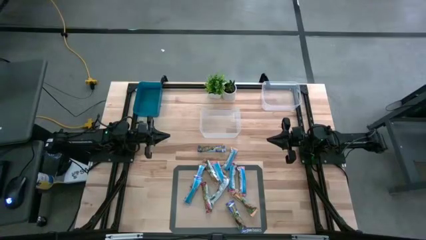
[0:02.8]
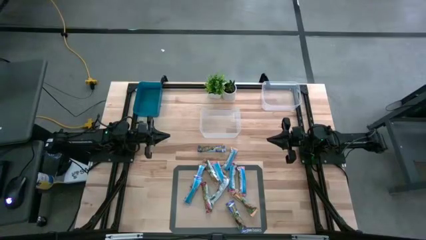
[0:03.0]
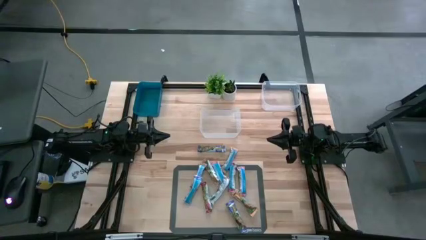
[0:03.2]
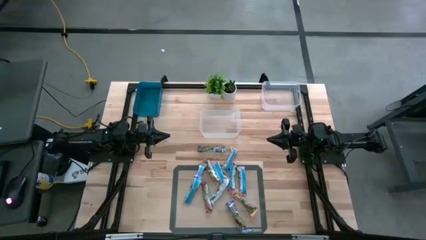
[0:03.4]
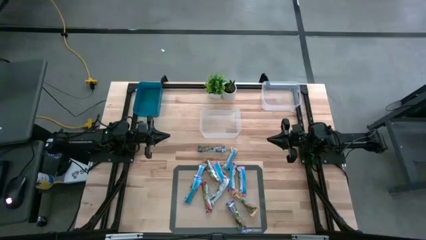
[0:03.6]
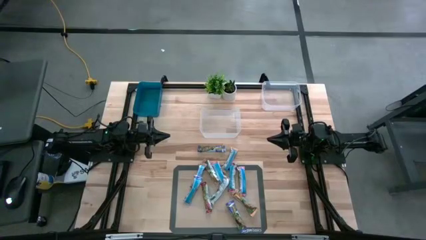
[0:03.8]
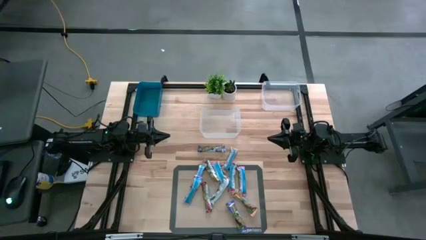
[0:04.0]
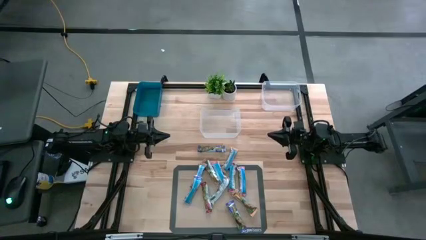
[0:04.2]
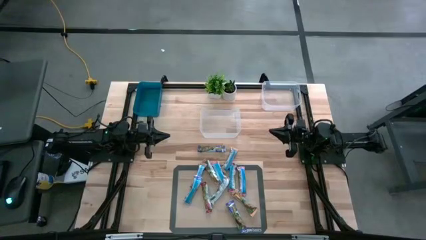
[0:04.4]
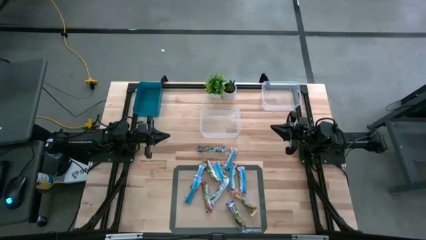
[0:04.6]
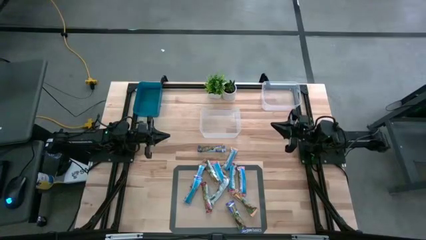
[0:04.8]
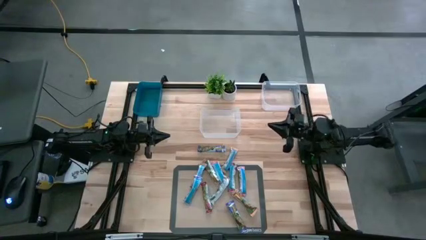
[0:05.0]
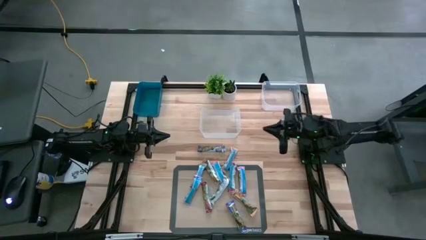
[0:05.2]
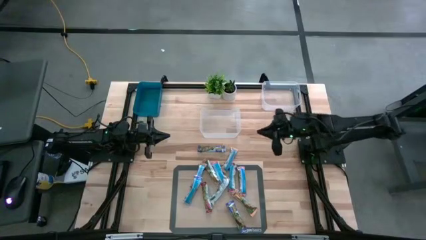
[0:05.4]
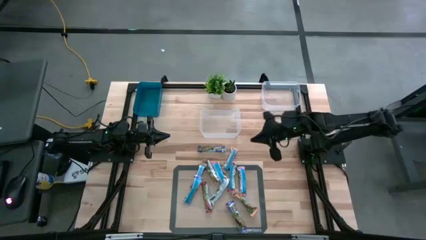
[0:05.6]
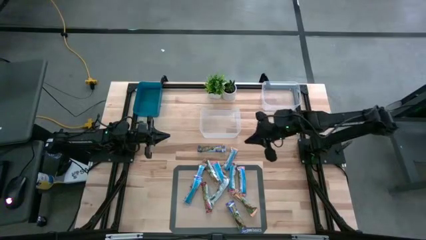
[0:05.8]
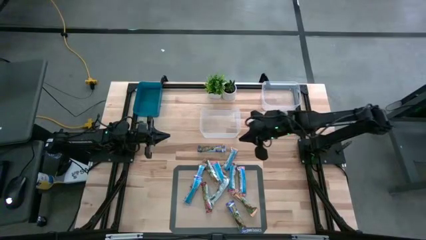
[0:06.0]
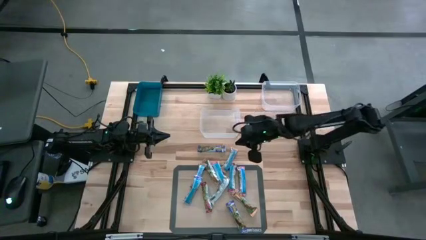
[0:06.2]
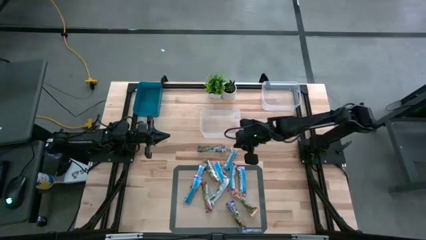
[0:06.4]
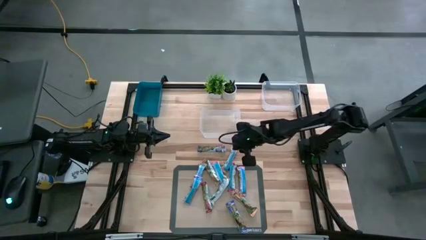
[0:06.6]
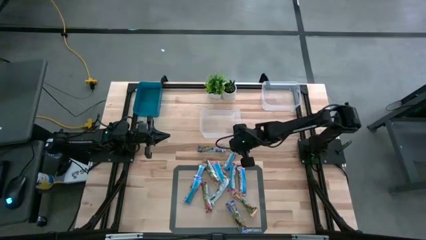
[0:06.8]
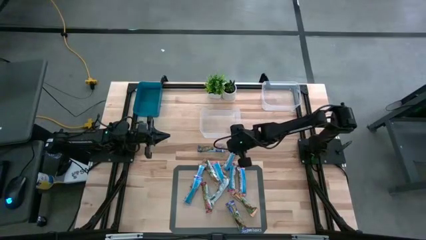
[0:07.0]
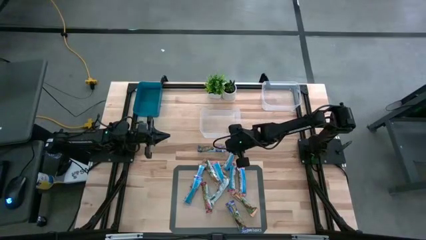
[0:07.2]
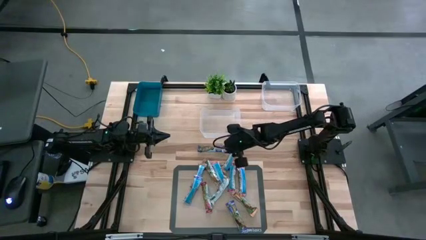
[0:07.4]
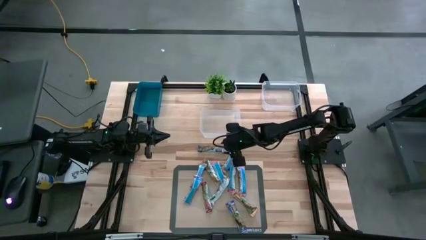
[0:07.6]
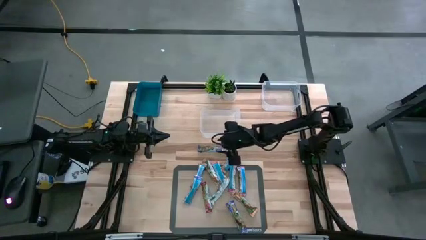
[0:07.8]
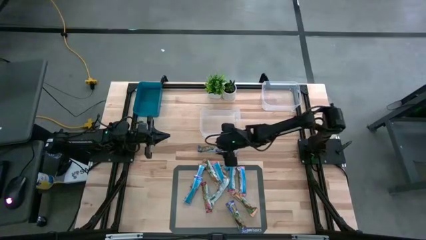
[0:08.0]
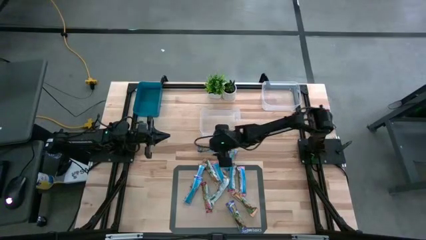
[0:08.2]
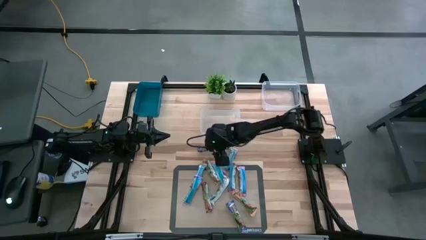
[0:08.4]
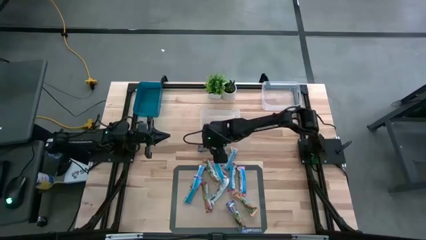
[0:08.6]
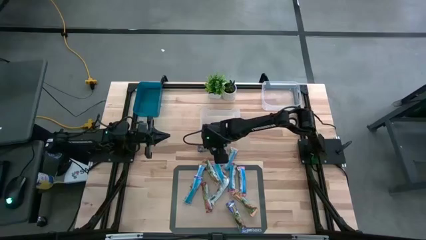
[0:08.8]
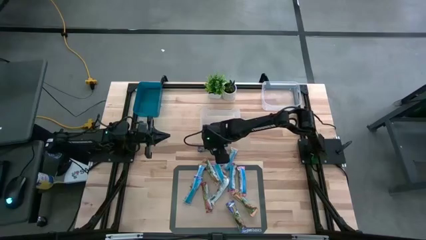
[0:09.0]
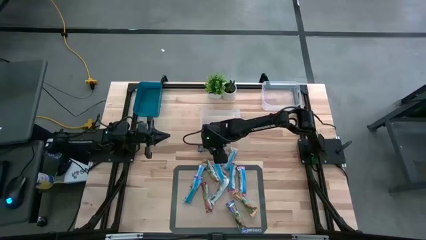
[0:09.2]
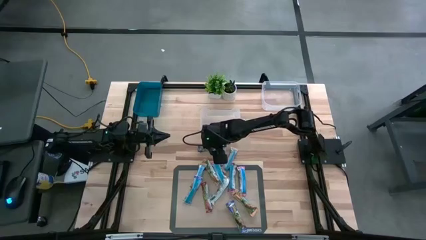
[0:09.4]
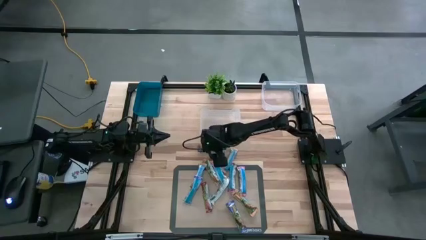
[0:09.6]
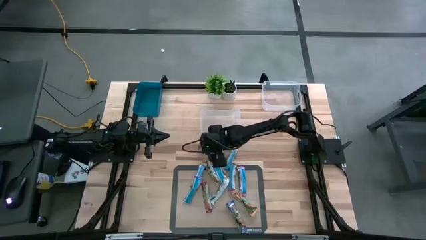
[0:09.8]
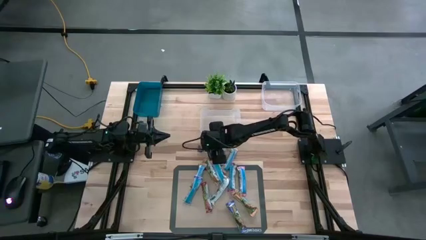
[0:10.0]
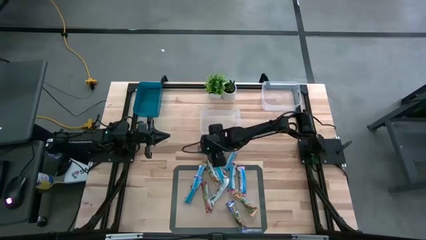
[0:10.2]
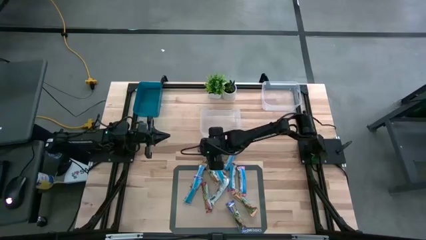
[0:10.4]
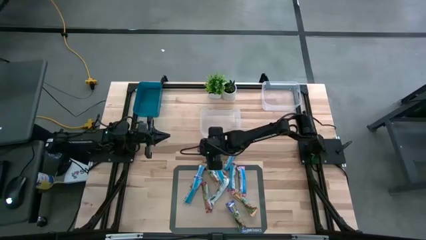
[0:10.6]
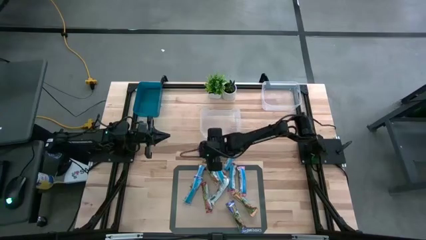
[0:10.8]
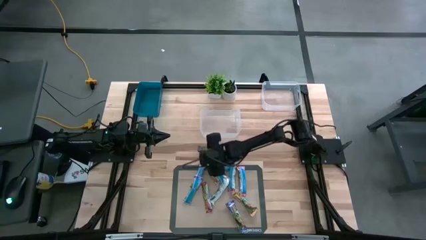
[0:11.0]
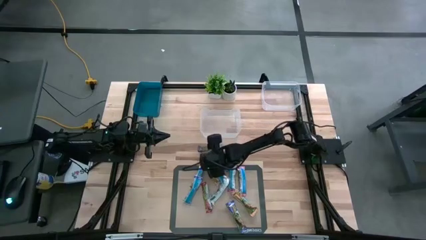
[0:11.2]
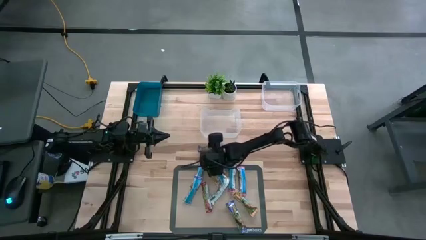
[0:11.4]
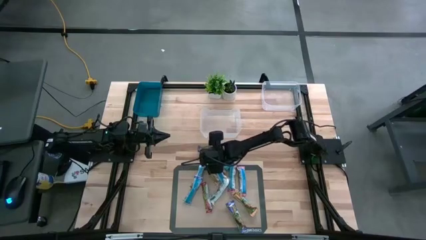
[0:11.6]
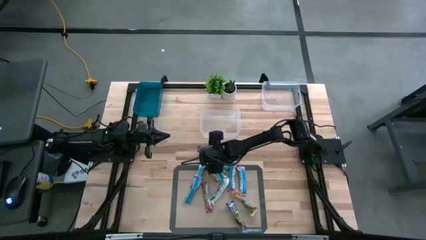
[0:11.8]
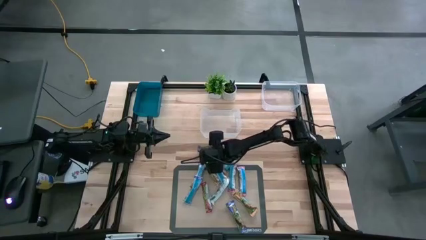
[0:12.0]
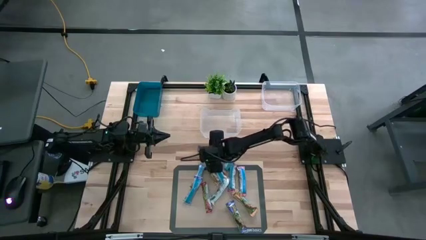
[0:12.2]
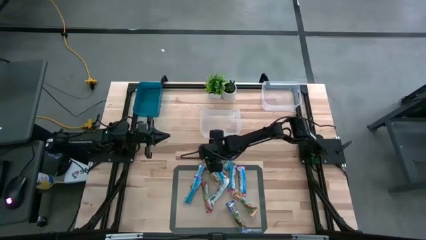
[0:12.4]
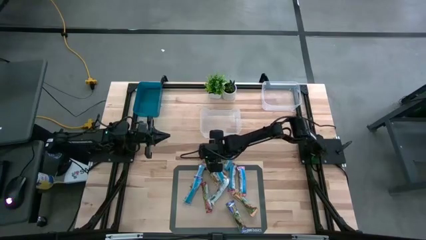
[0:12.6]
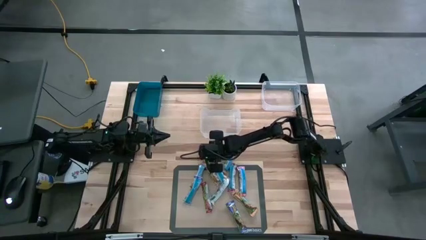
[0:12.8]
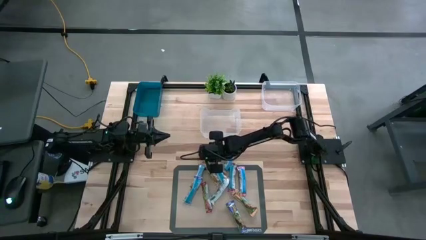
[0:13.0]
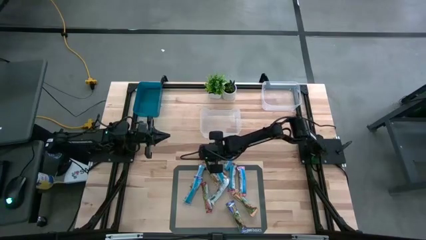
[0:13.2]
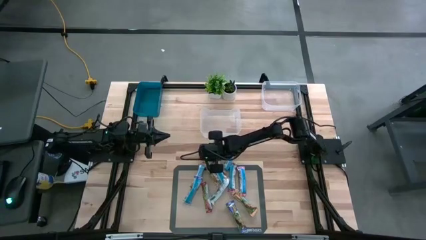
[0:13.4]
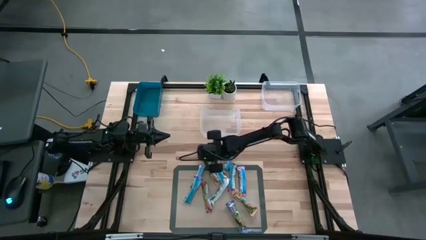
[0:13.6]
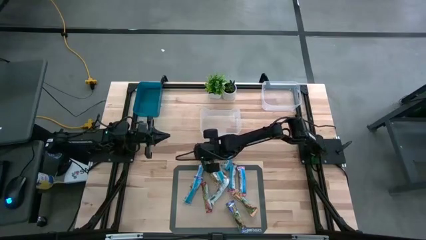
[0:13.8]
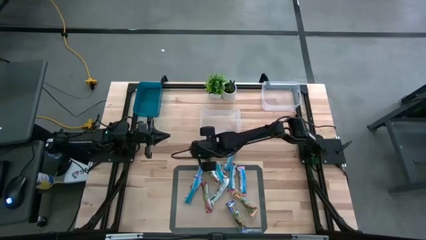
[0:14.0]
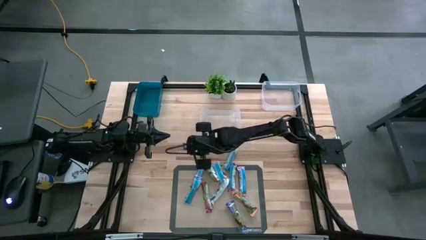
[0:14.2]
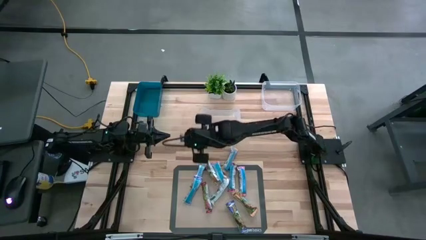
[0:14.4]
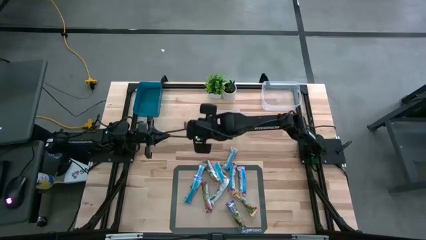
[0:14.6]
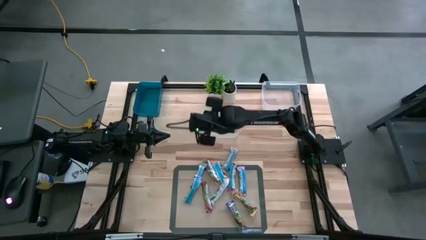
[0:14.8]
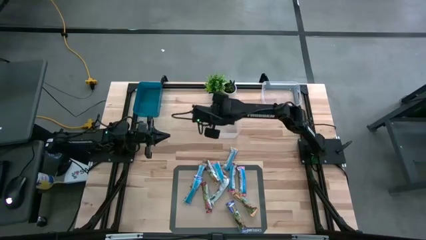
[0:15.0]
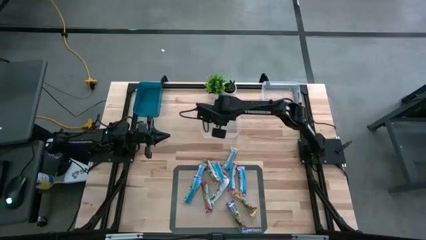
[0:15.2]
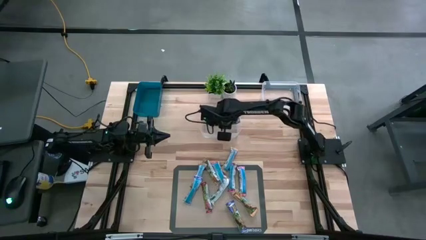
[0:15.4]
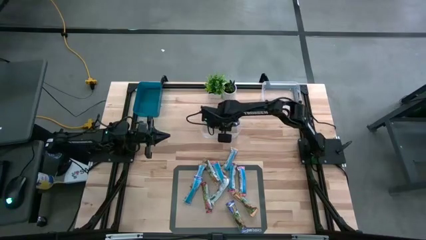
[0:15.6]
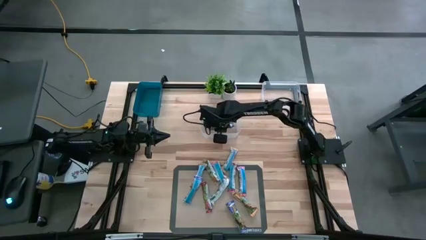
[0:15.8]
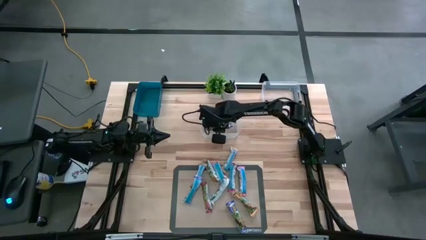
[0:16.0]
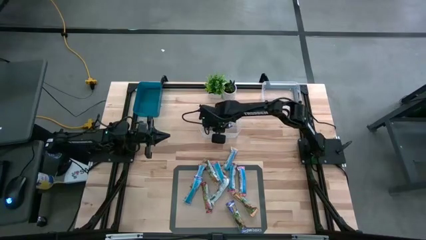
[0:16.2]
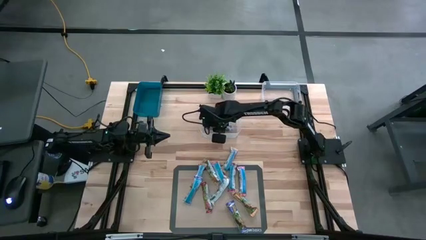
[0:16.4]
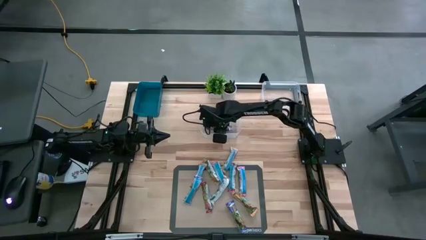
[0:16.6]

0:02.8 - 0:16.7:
Task: Pick and place Granola Bars by type
Put the blue granola bar in the left transparent bin
